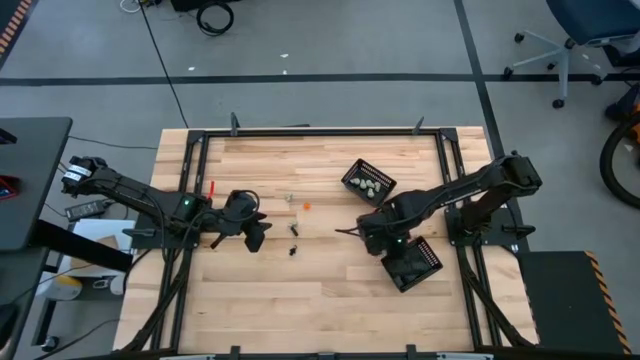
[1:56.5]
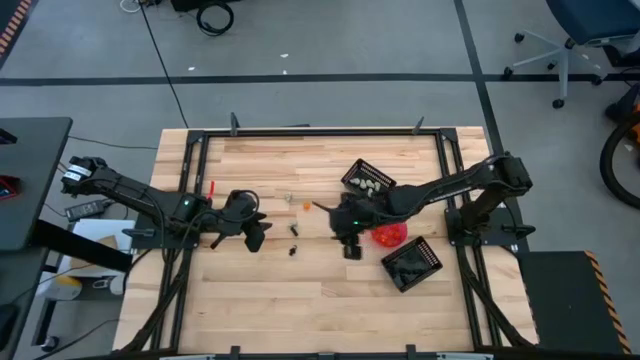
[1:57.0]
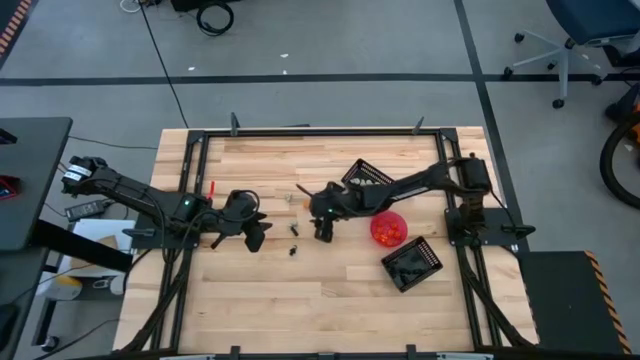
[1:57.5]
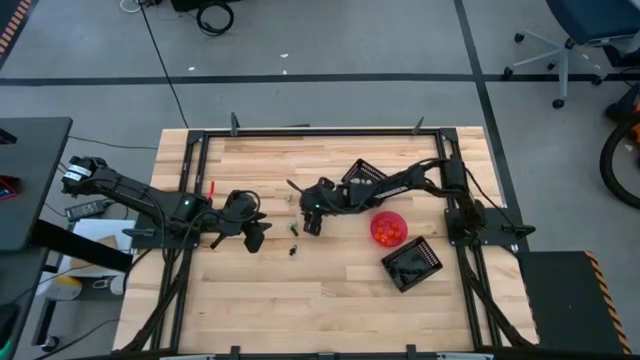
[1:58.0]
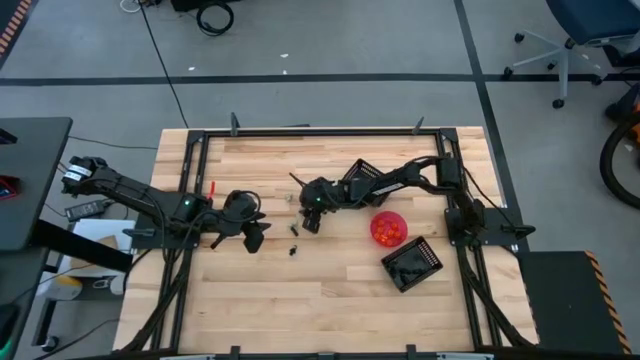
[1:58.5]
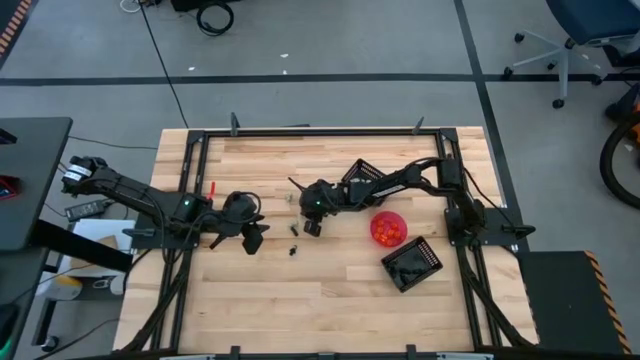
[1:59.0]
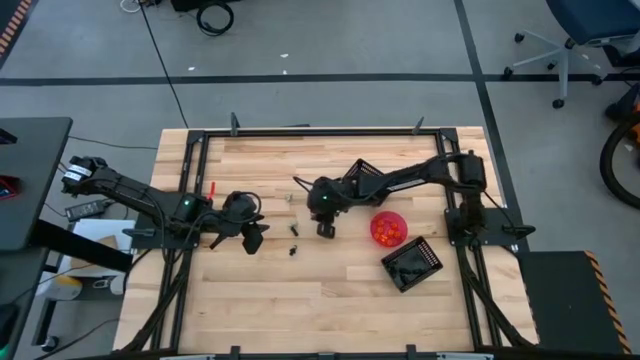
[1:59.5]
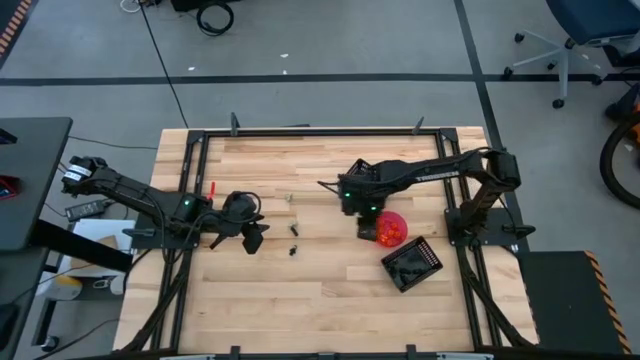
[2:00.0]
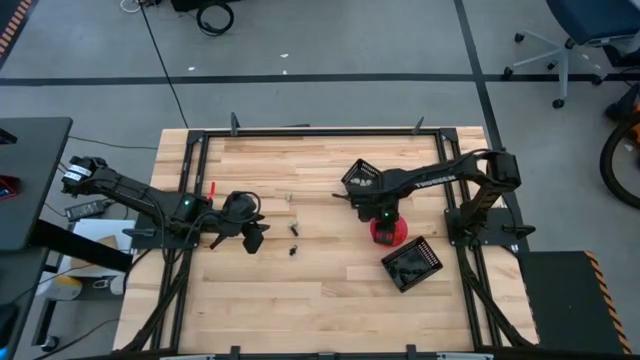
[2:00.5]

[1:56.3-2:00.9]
Task: Sort Halloween decoration
Put the orange pumpkin toy into the red bowl

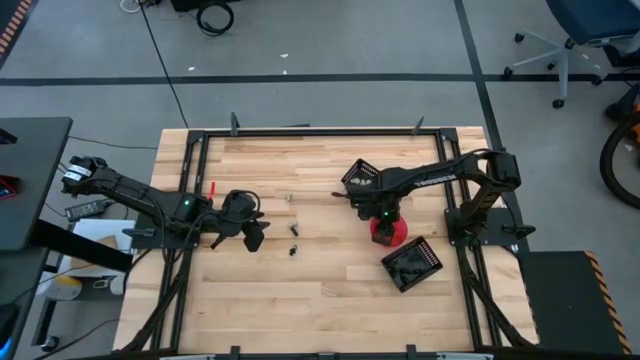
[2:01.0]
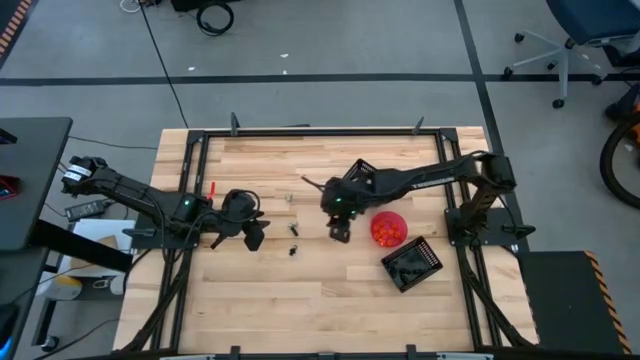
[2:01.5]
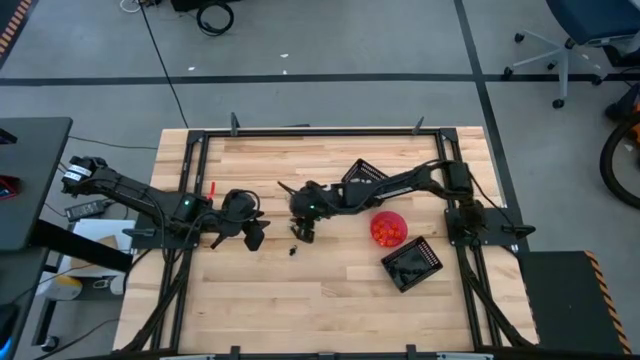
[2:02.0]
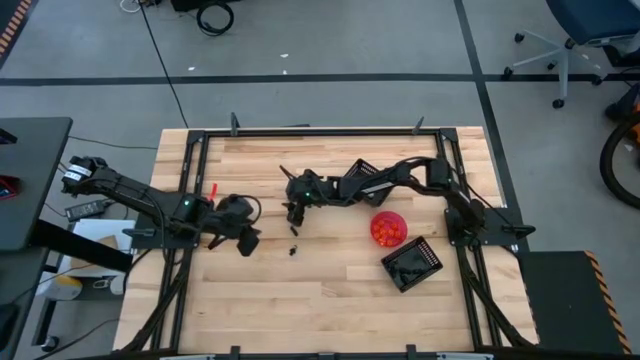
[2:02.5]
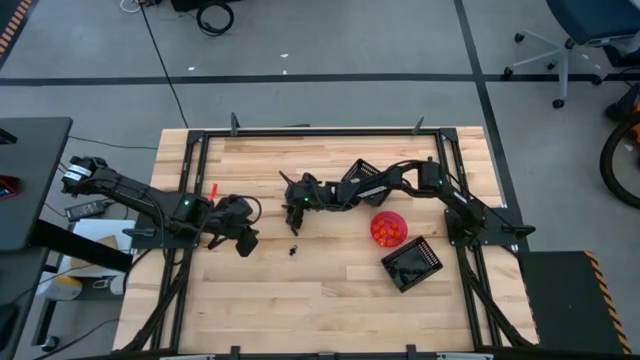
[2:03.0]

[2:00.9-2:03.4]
Put the white skull toy into the top black basket

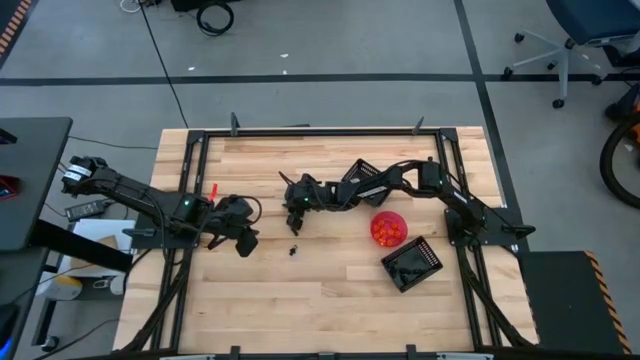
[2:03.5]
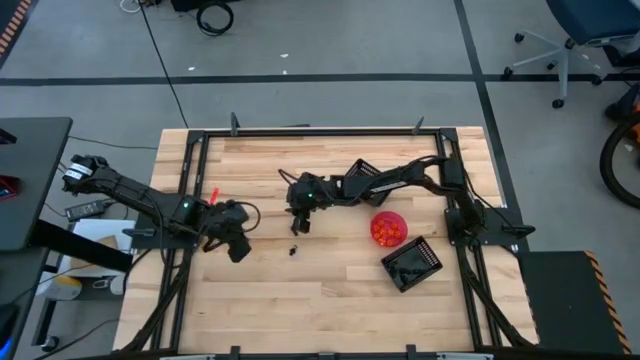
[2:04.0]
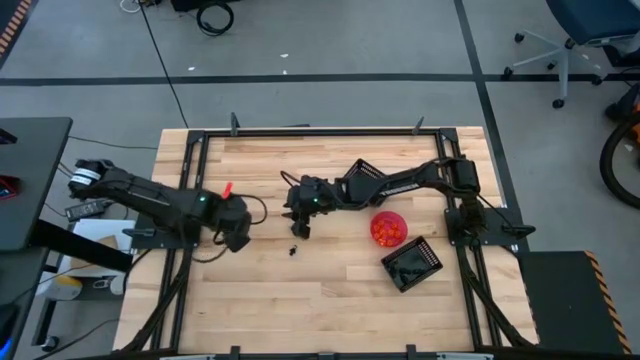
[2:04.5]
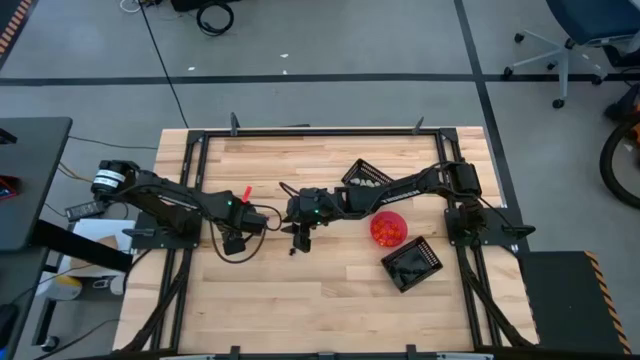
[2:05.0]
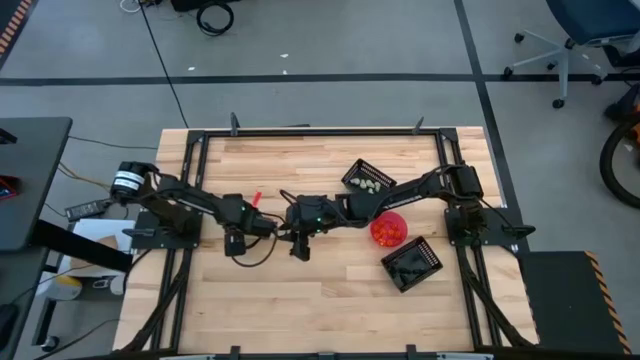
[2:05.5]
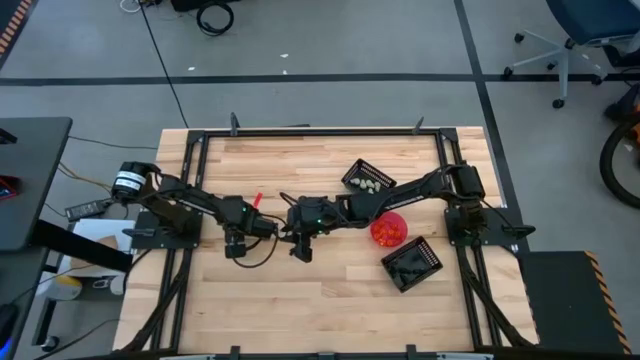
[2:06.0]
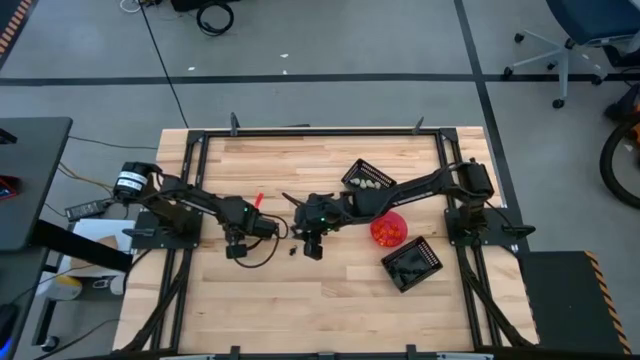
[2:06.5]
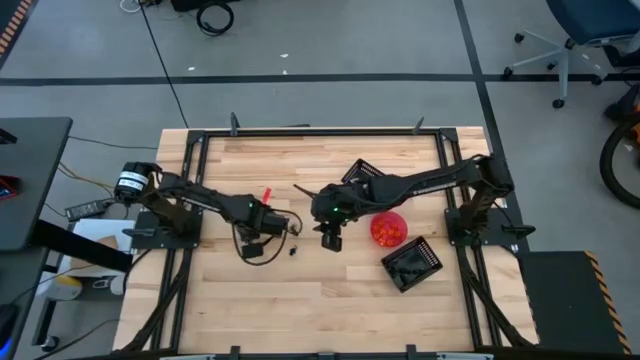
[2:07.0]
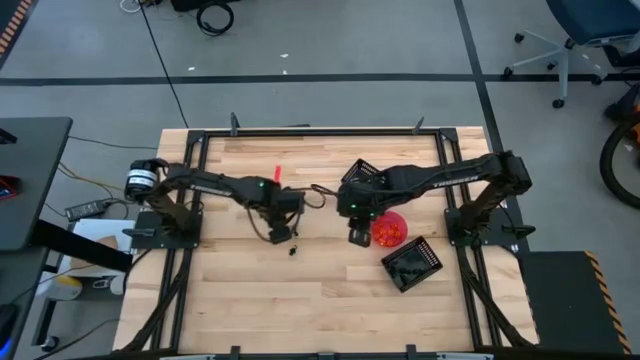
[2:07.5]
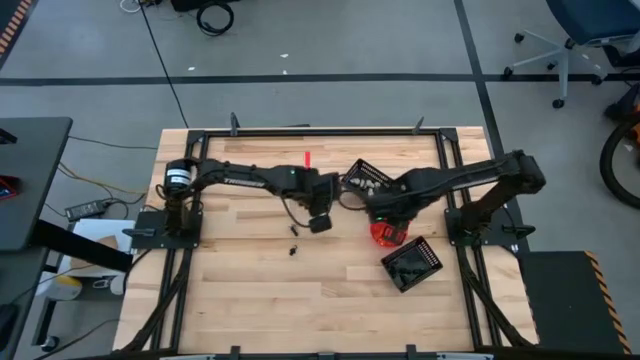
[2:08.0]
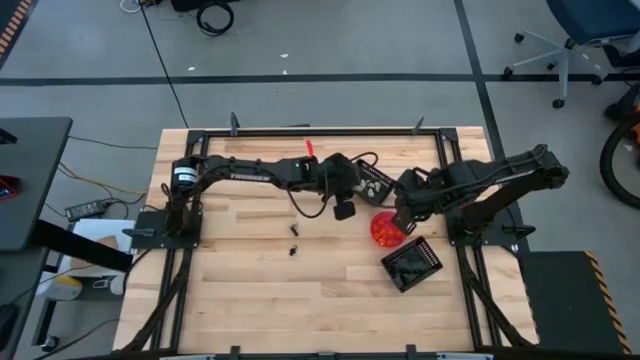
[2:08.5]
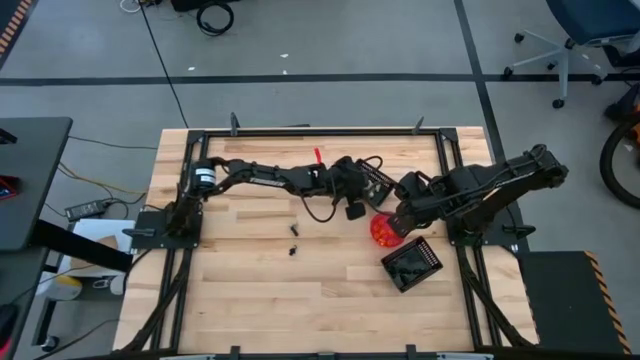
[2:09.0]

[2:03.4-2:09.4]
Put the white skull toy into the top black basket

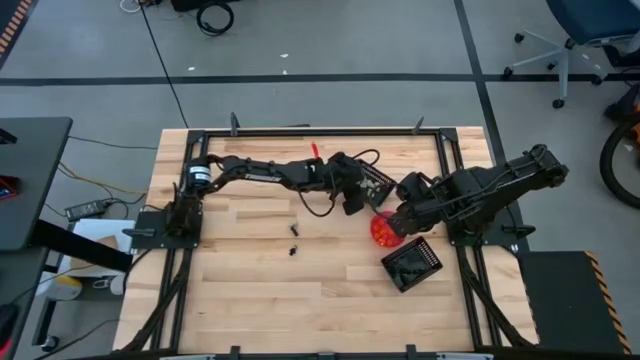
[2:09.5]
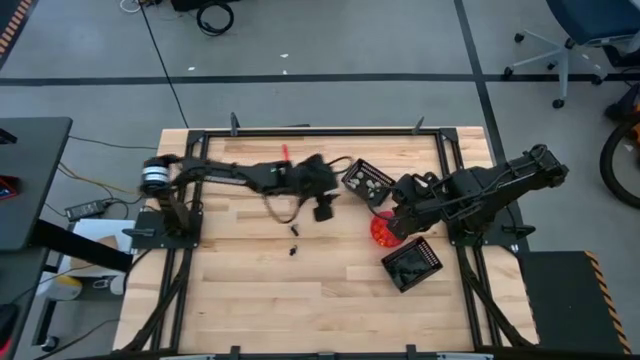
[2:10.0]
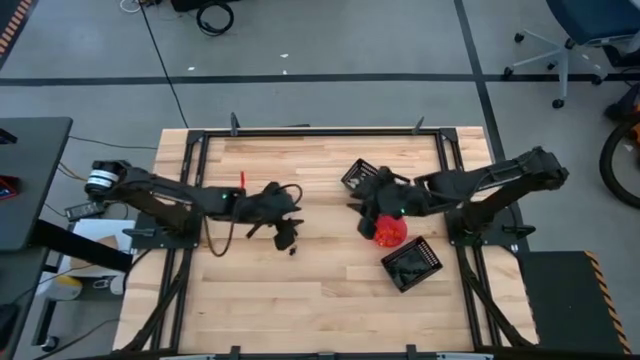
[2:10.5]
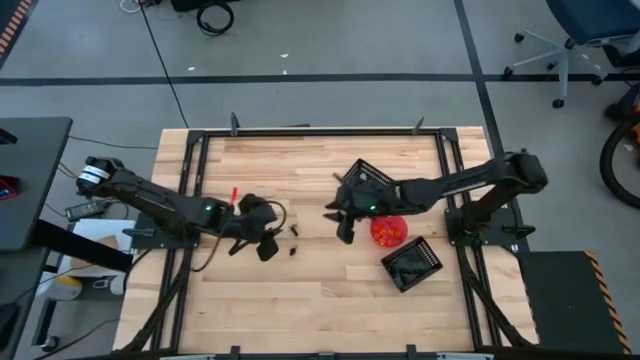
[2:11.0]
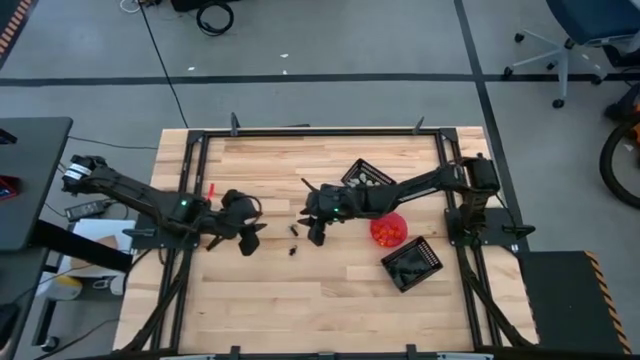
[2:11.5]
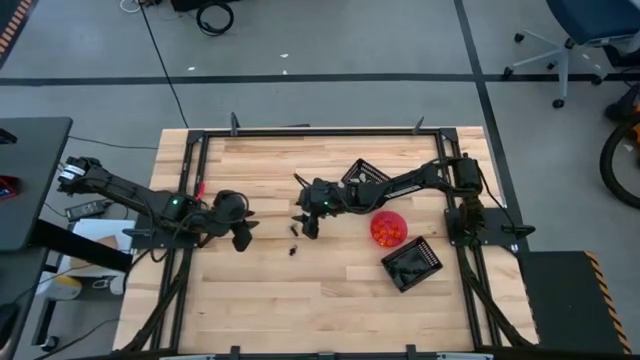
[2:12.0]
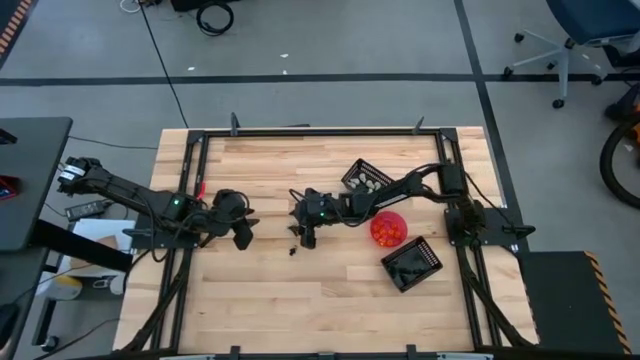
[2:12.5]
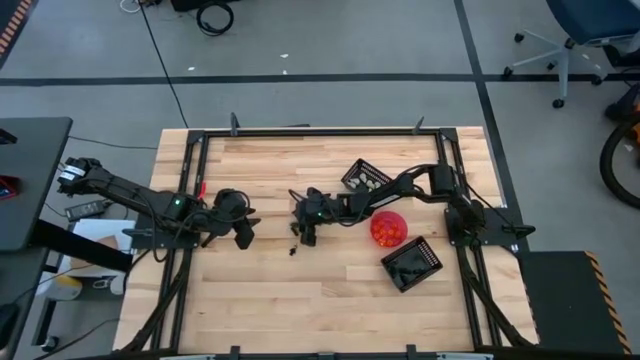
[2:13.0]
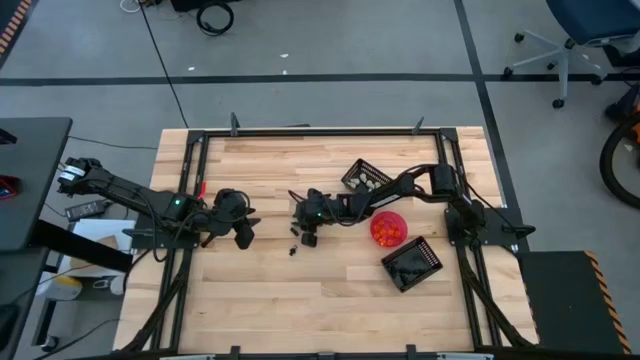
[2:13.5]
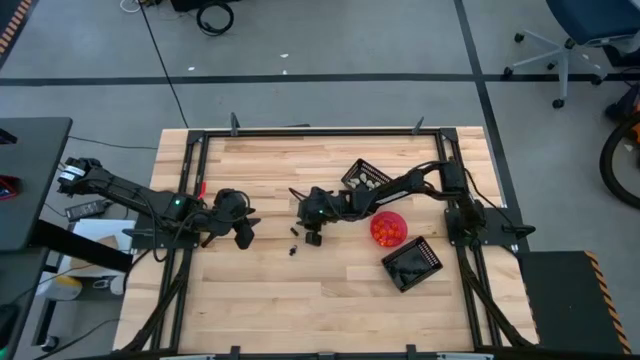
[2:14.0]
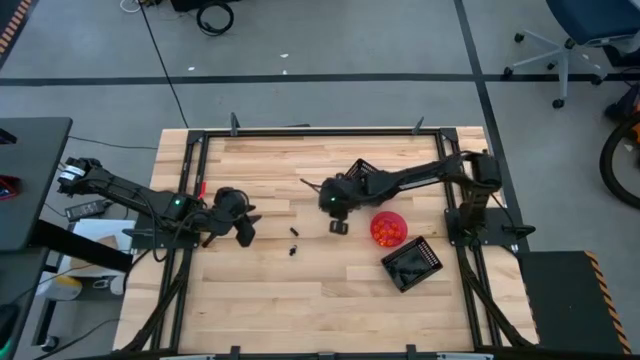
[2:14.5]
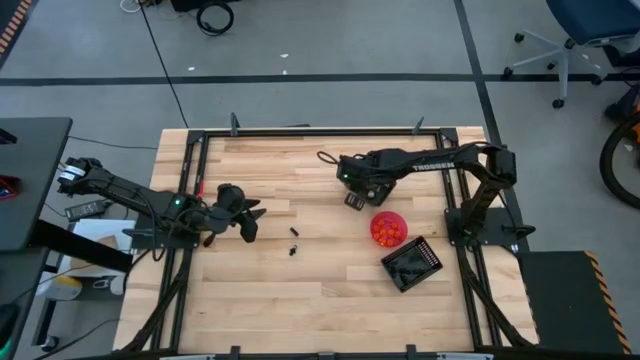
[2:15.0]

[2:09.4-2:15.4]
Put the white skull toy into the top black basket

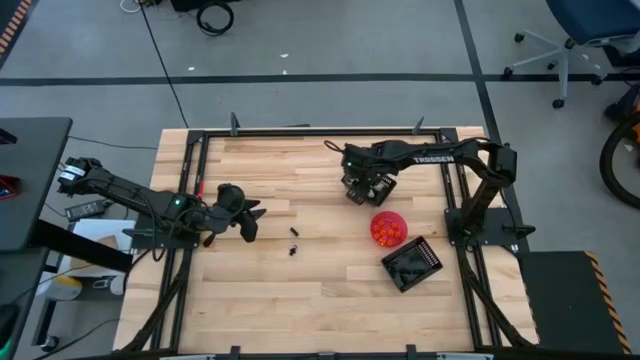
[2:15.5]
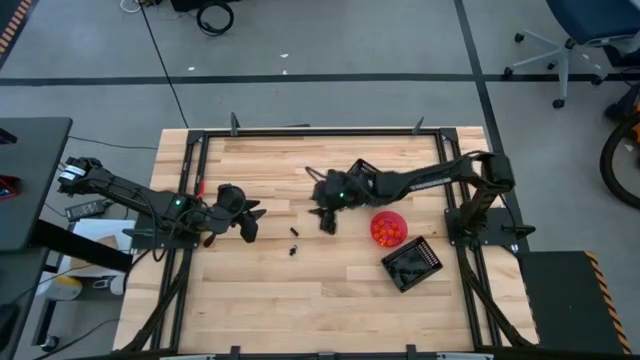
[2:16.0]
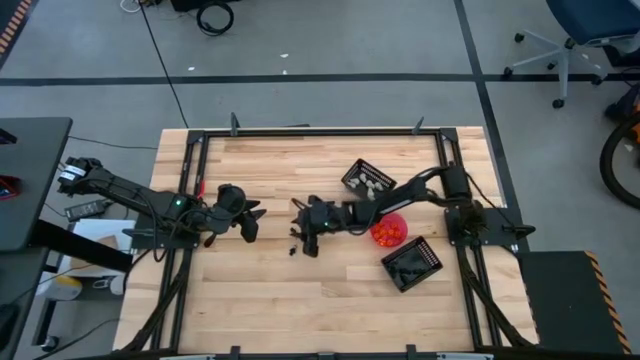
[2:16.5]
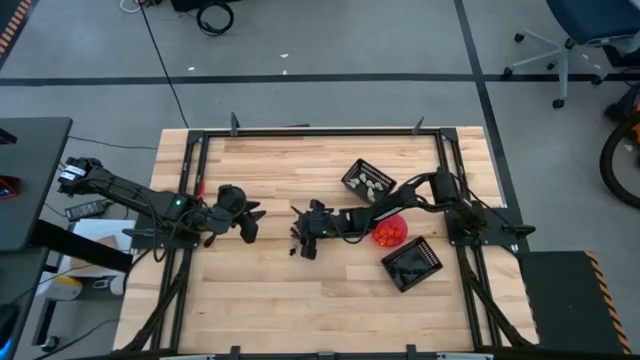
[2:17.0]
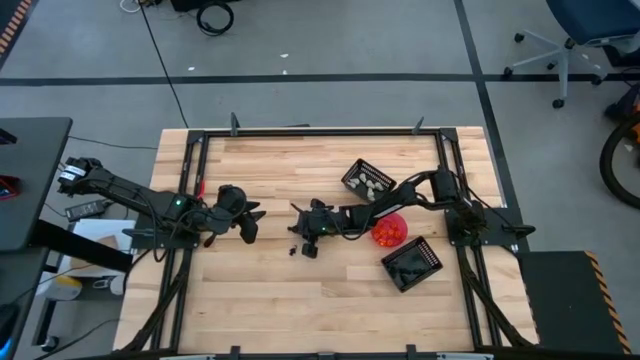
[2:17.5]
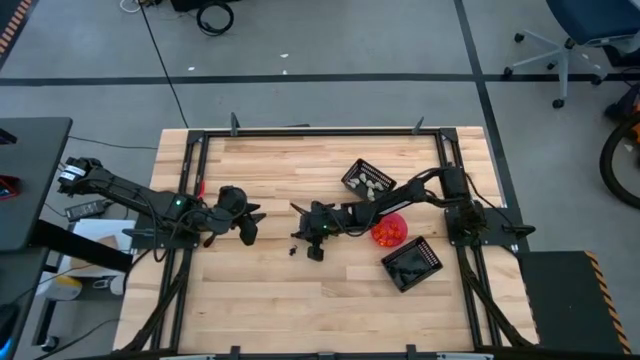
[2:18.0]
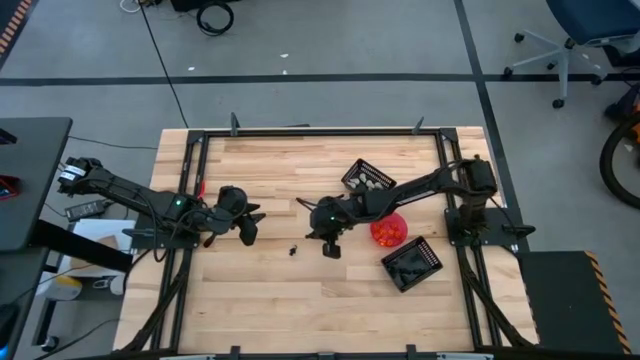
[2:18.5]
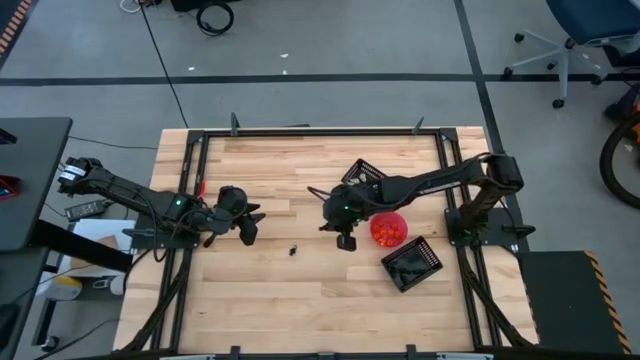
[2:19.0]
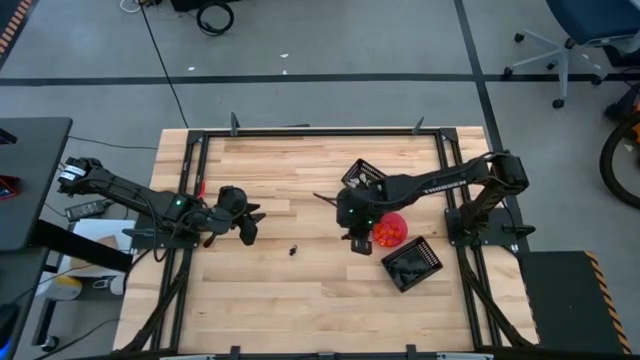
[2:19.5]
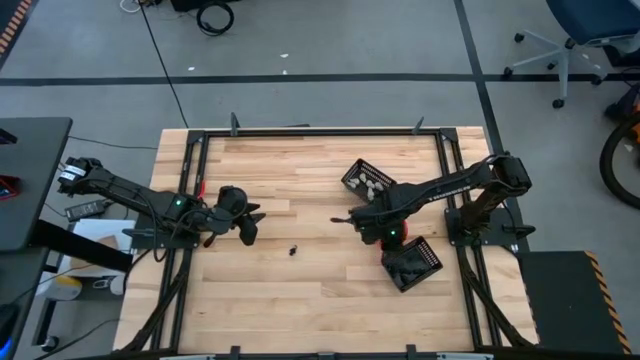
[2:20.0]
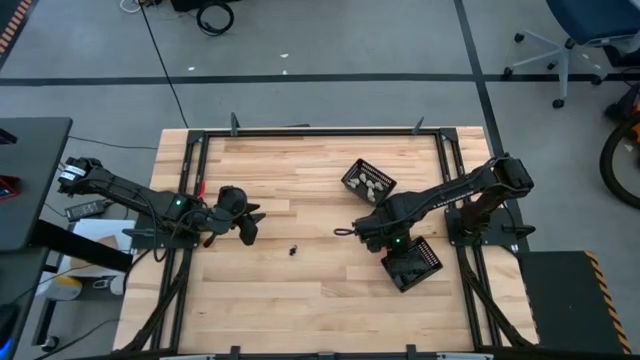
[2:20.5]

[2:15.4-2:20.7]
Put the black skeleton toy into the bottom black basket
